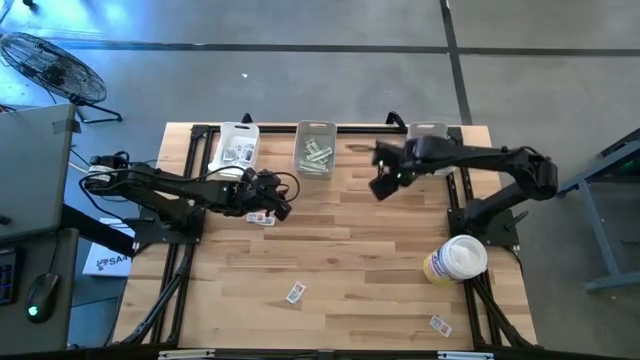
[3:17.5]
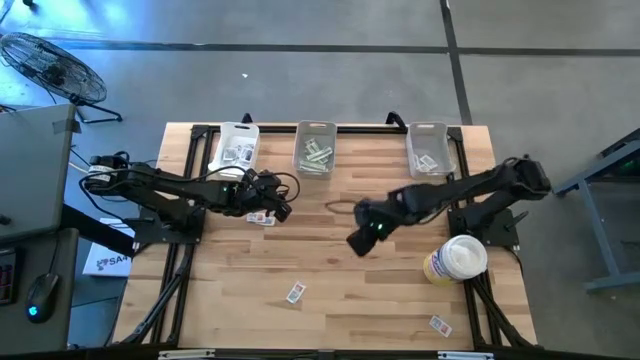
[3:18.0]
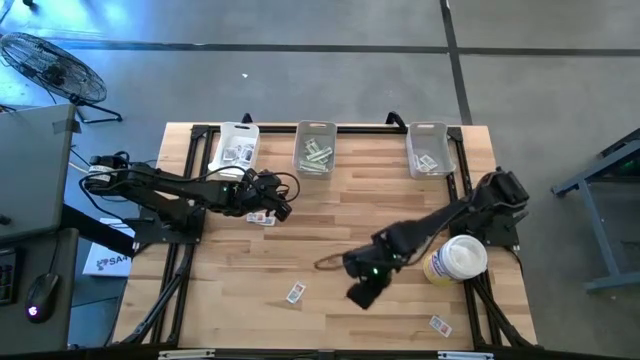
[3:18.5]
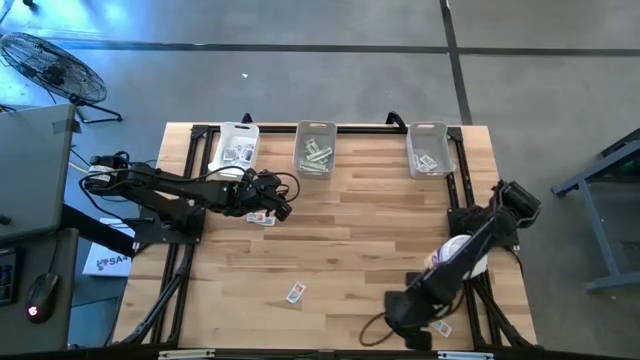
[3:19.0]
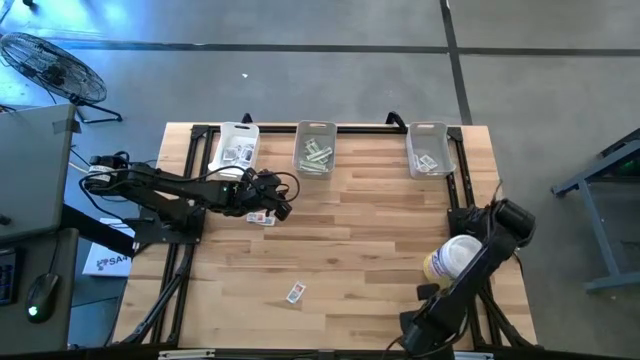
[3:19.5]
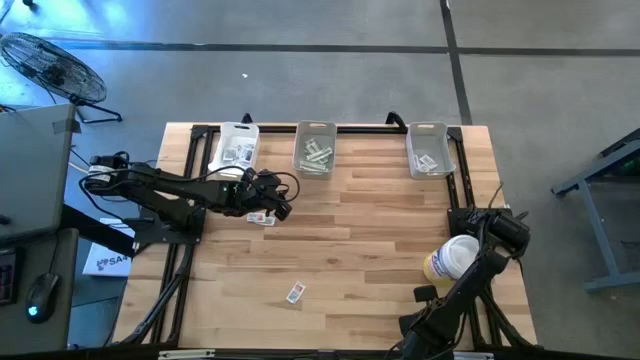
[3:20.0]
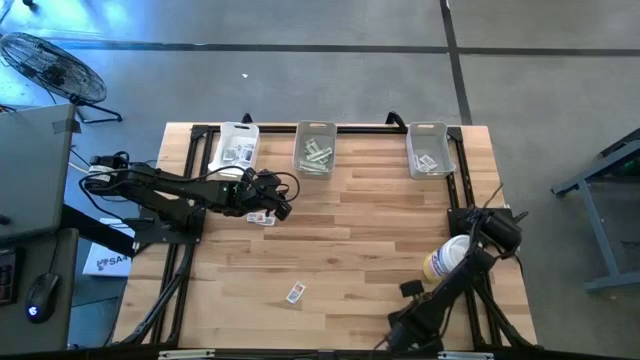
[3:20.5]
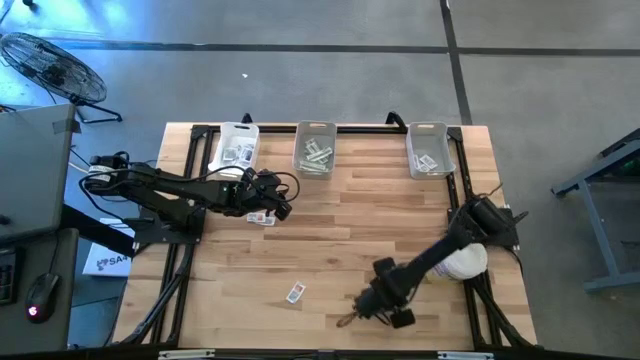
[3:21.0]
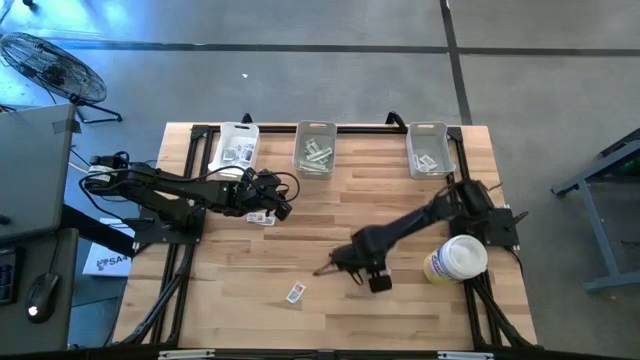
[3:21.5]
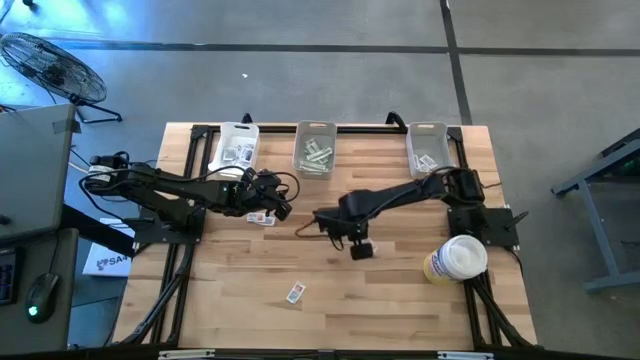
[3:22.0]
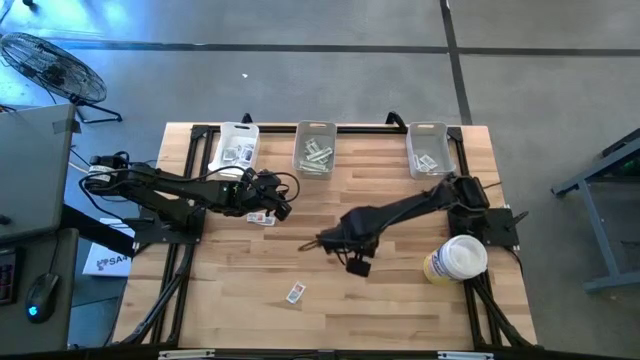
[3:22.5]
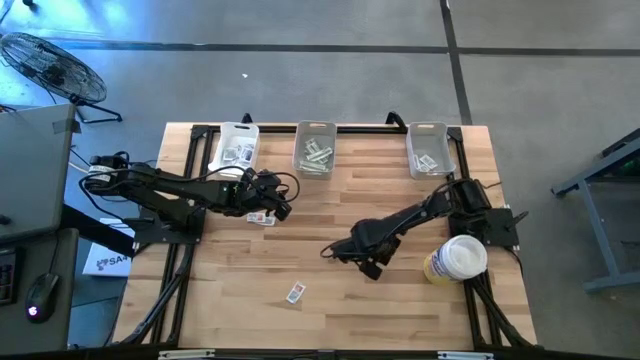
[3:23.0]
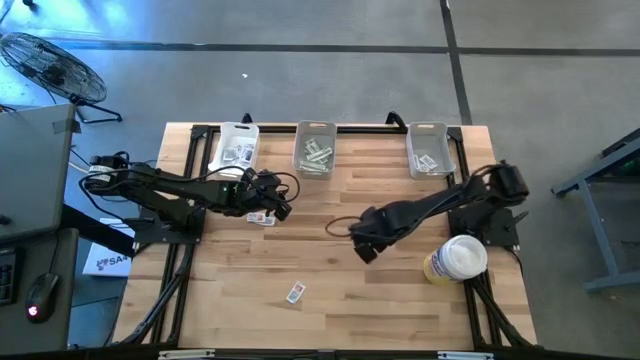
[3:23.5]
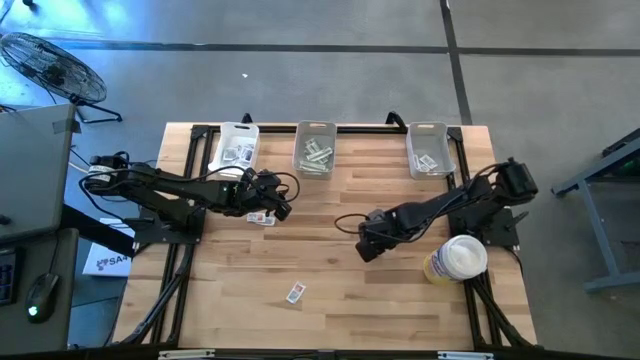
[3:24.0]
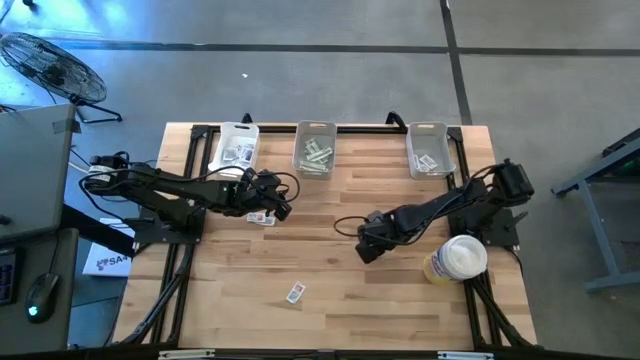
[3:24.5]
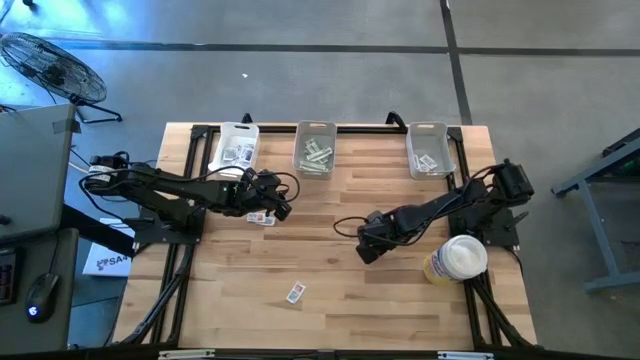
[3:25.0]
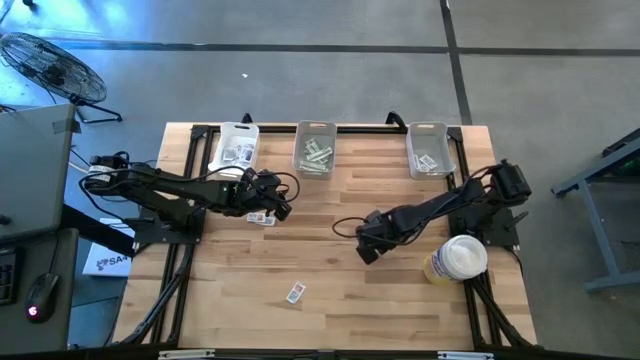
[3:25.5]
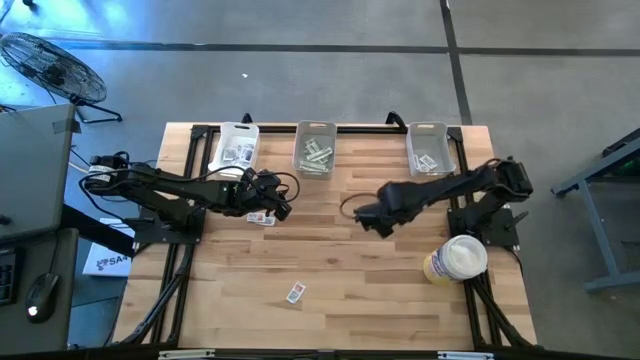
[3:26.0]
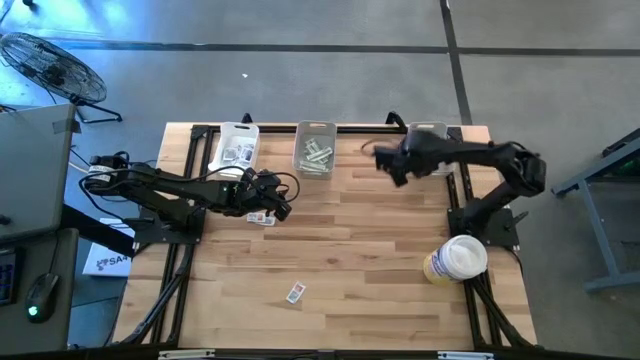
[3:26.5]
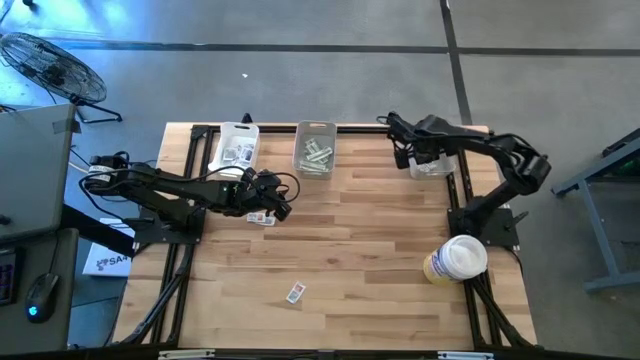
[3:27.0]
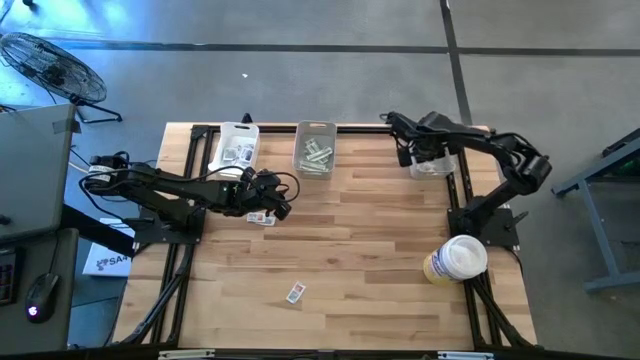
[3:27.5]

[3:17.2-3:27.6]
Task: Pick & Place First Aid Supplies
Put the orange pad into the right gray bin

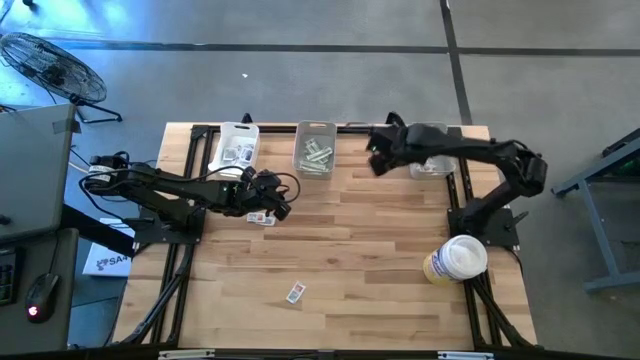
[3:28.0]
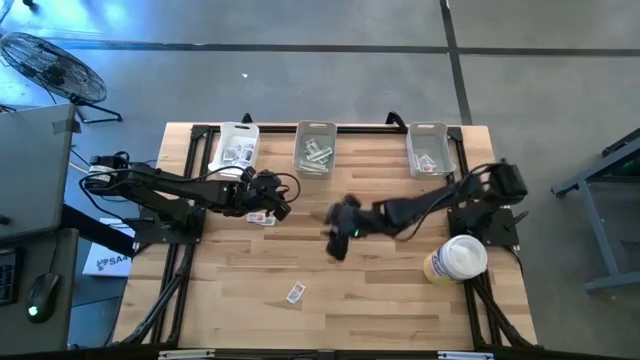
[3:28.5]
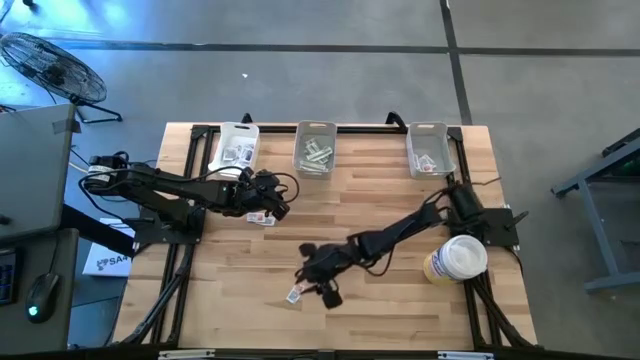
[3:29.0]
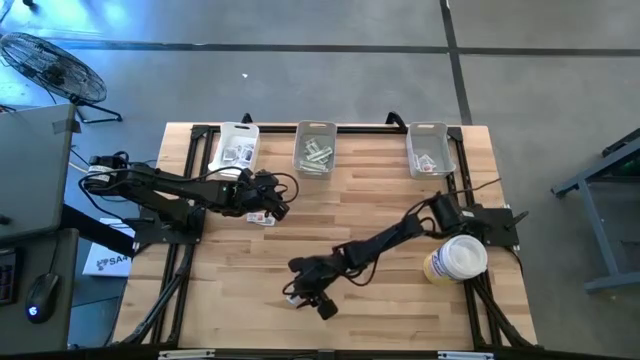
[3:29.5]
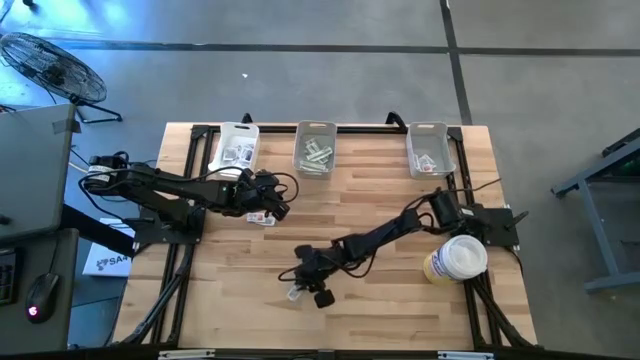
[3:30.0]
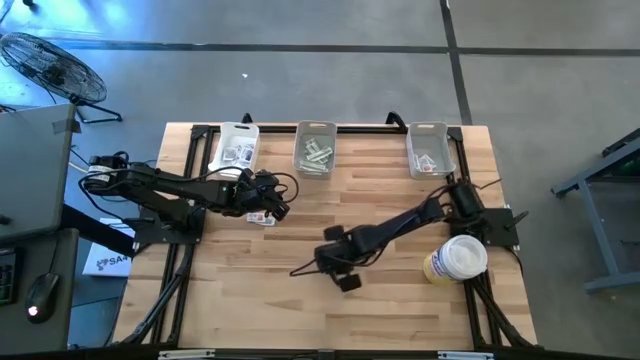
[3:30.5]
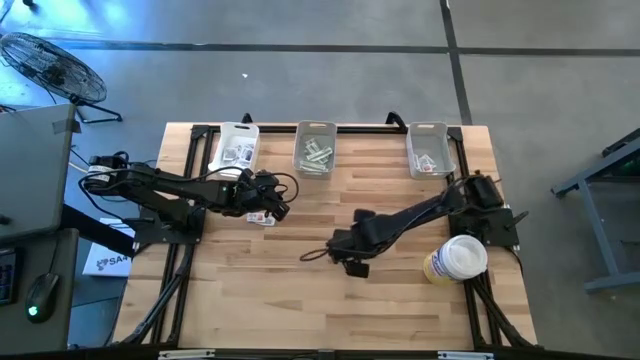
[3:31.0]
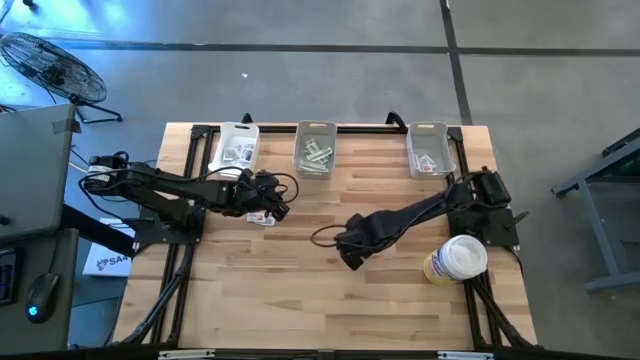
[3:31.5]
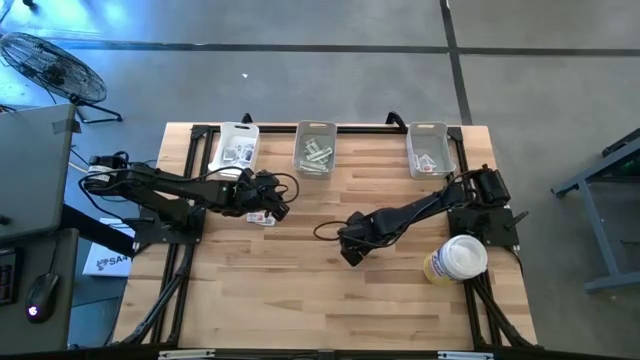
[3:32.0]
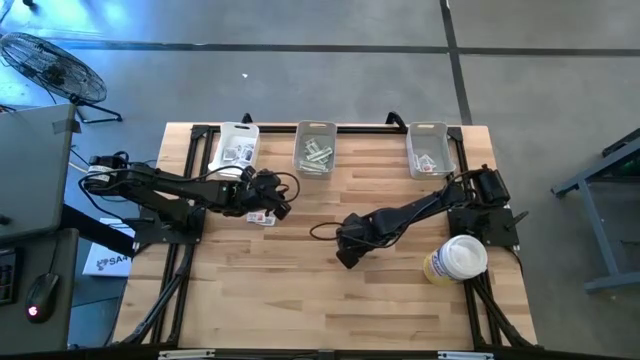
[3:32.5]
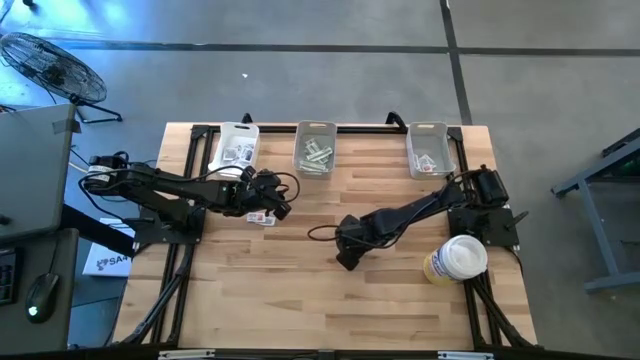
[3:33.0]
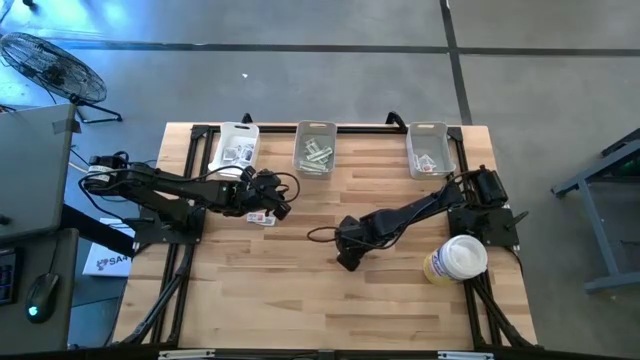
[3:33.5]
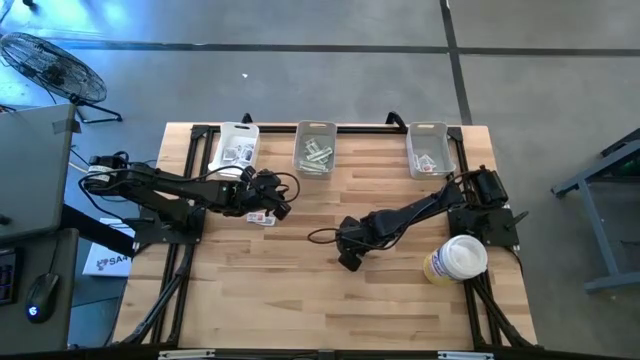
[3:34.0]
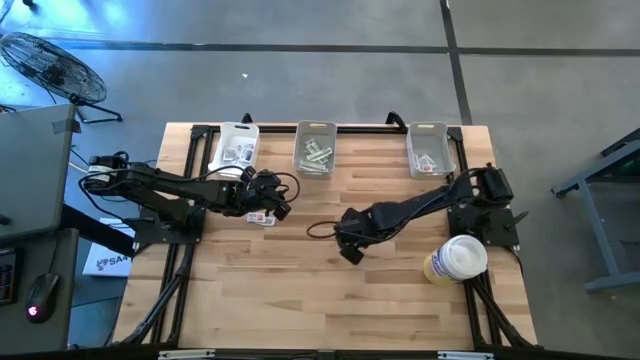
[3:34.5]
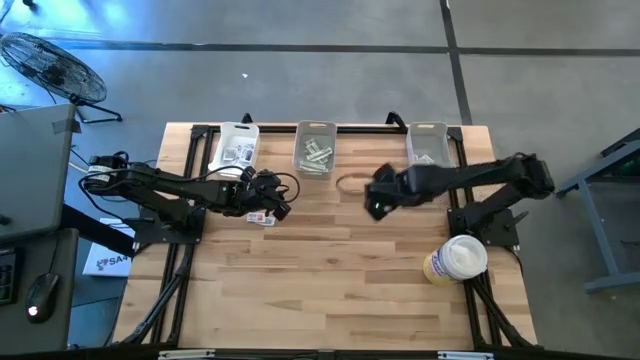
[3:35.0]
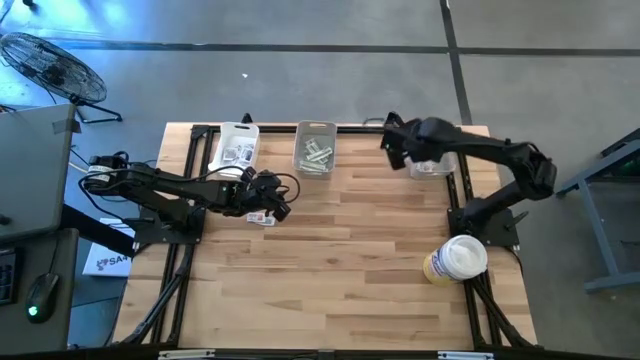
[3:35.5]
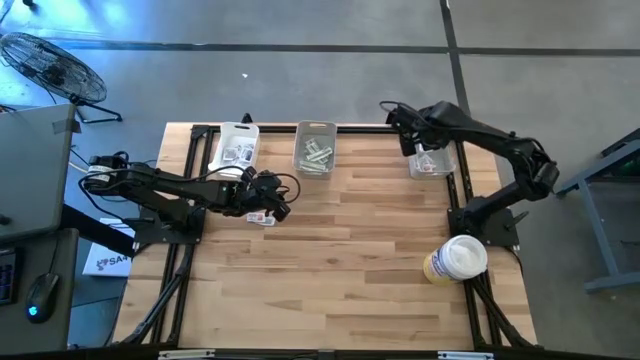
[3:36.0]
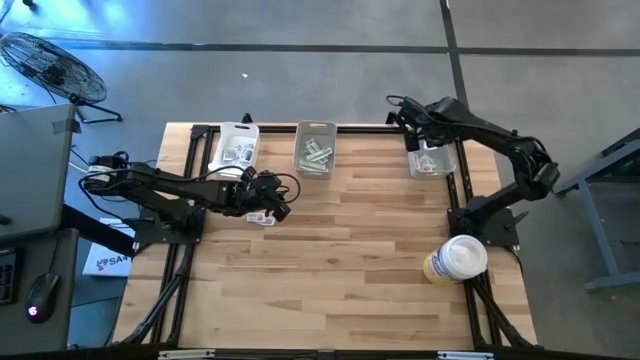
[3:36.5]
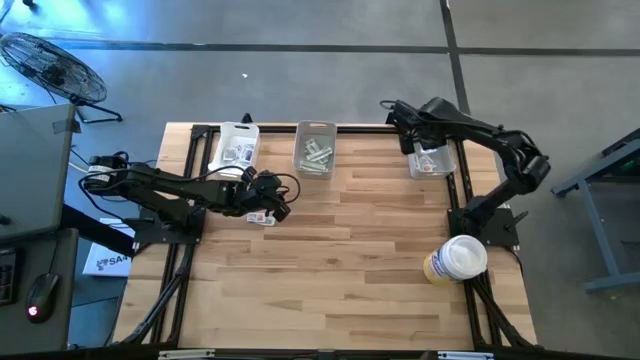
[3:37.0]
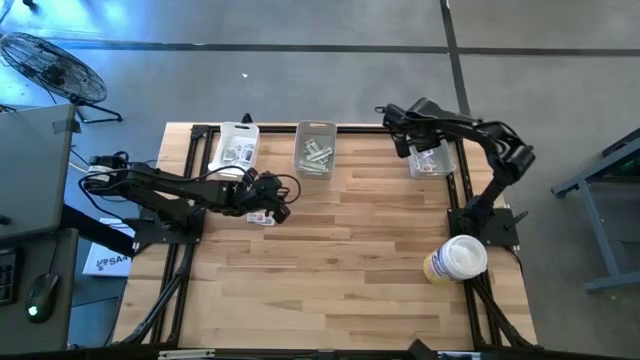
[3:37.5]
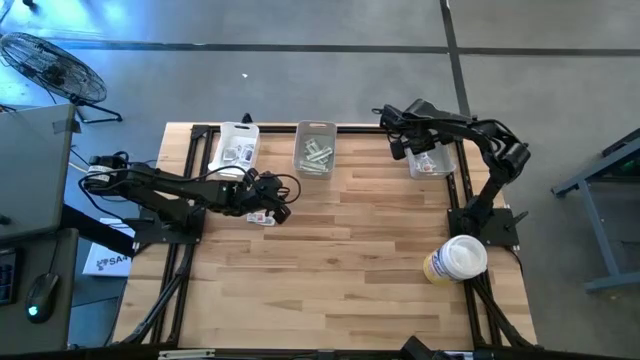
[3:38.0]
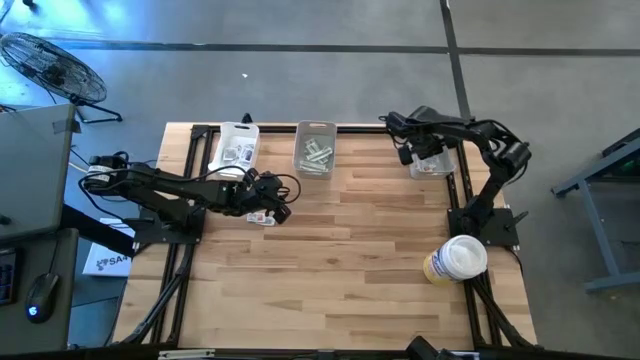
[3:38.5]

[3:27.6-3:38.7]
Put the orange pad into the right gray bin
